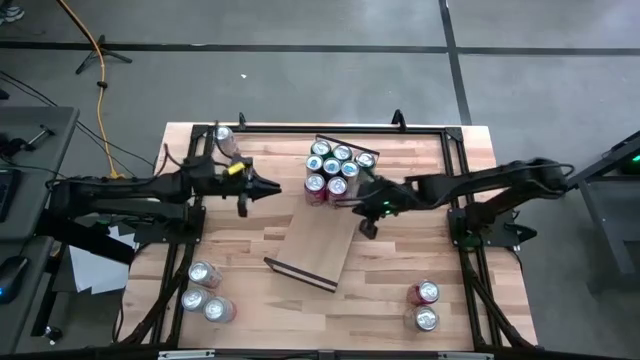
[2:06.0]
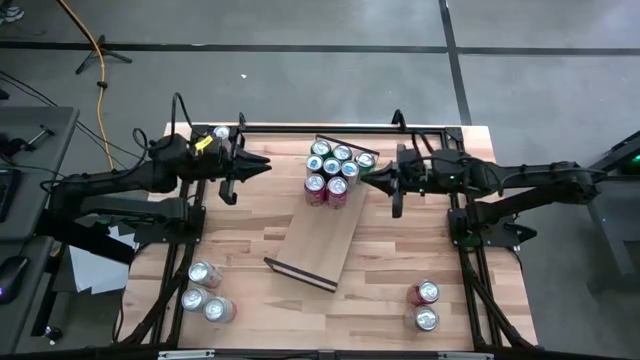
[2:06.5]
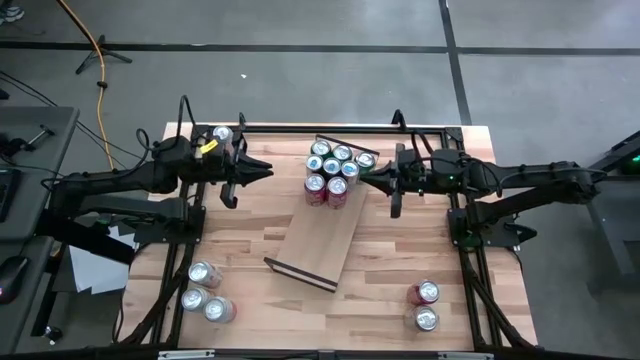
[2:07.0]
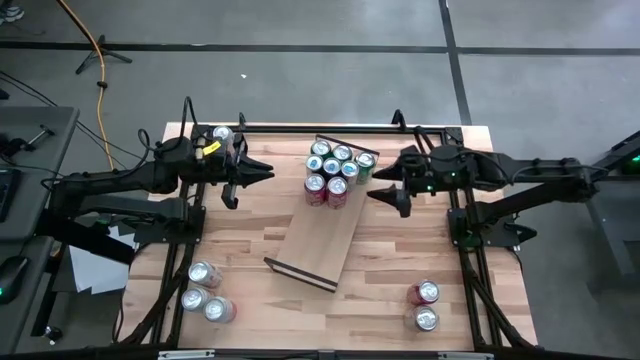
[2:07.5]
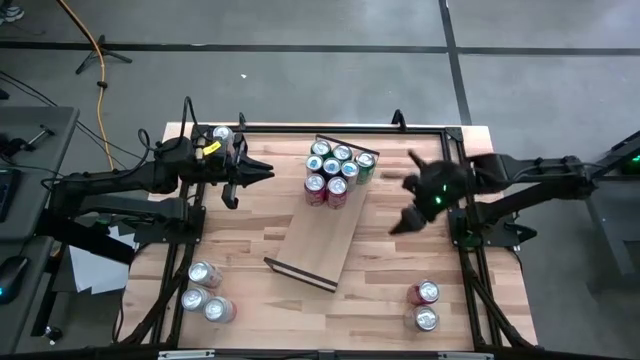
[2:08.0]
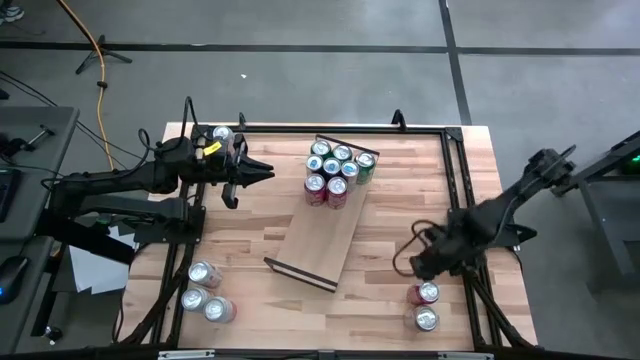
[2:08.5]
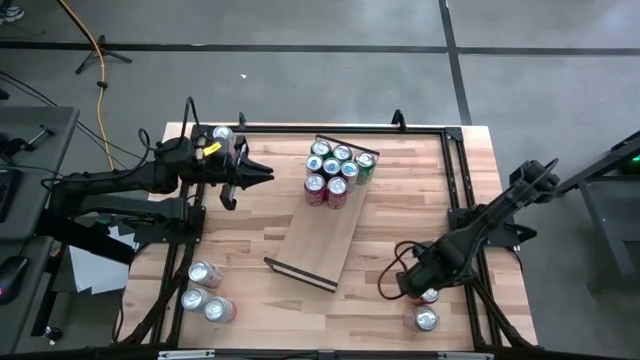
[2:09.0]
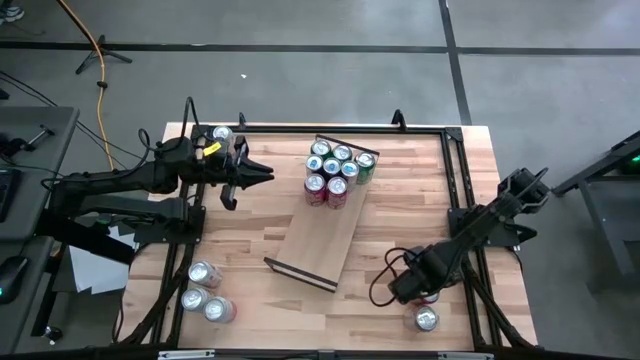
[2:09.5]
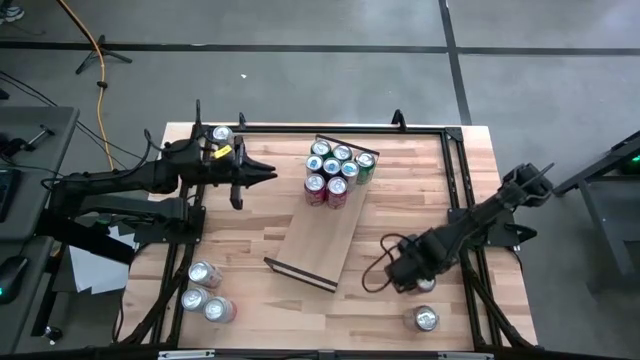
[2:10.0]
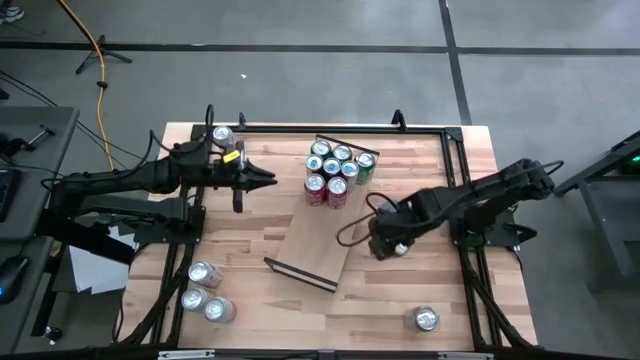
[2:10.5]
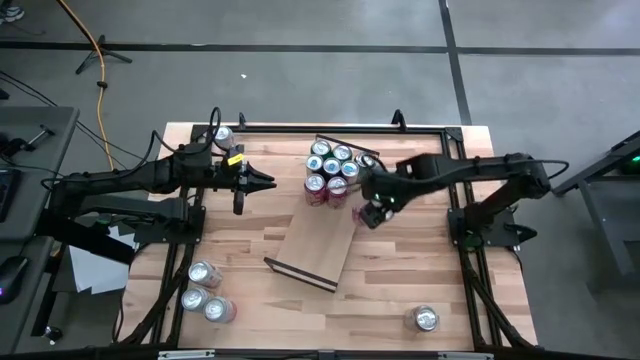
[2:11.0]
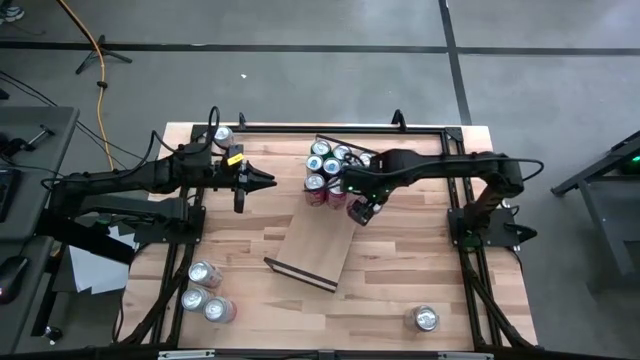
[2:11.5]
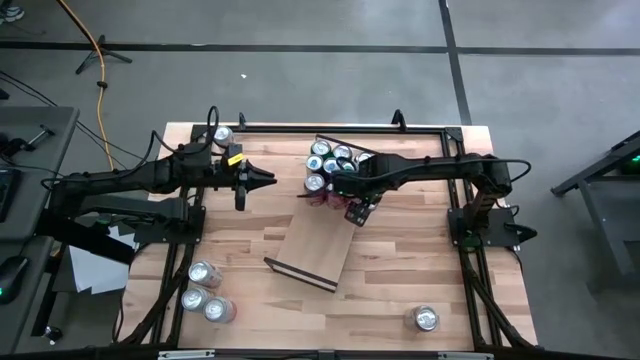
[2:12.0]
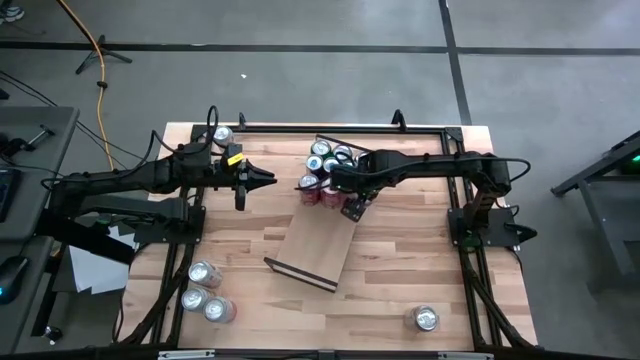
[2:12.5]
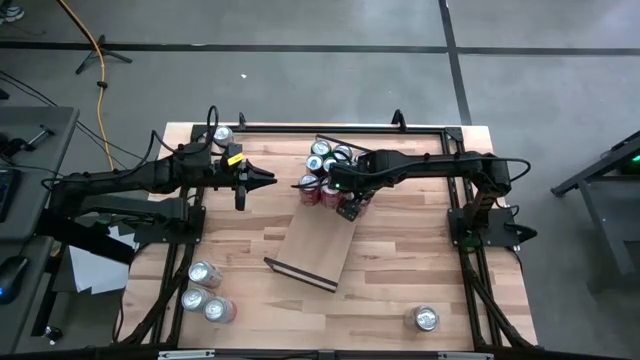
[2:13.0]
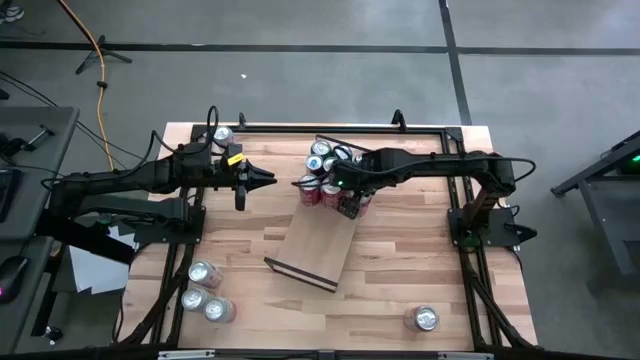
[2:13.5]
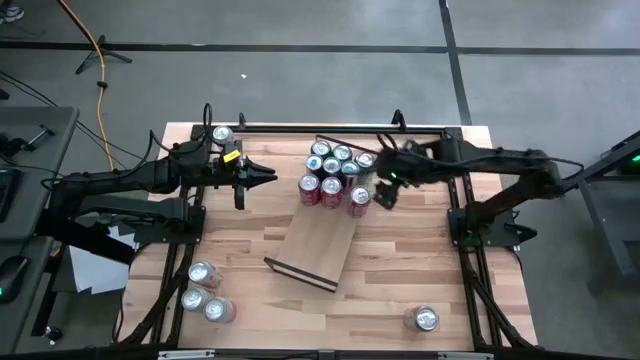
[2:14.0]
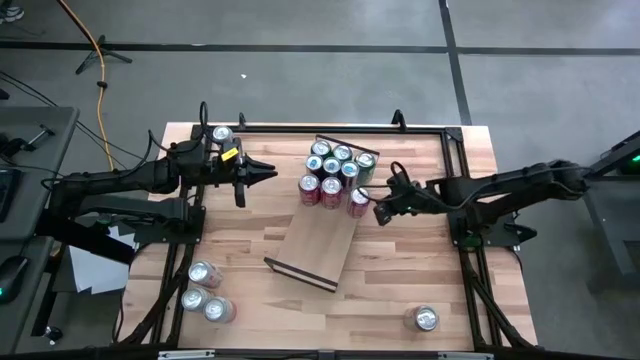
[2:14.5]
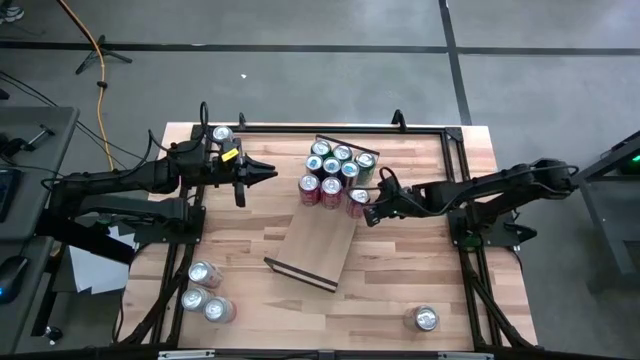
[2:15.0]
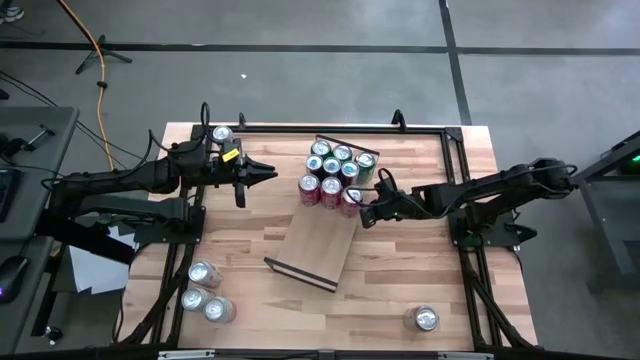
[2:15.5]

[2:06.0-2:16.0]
Task: Place canned beverage on shelf
Put the red soda can on the shelf aligned with the other red soda can

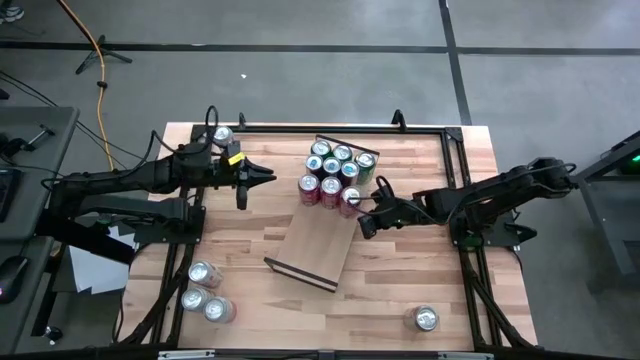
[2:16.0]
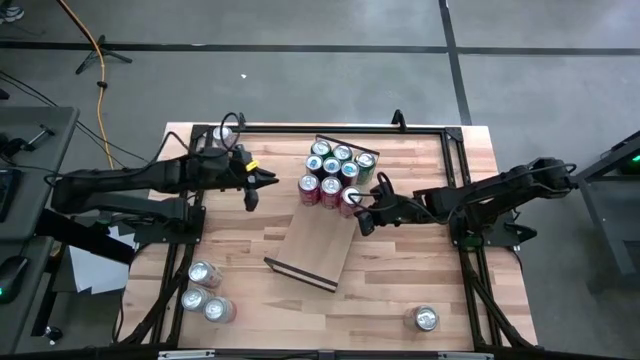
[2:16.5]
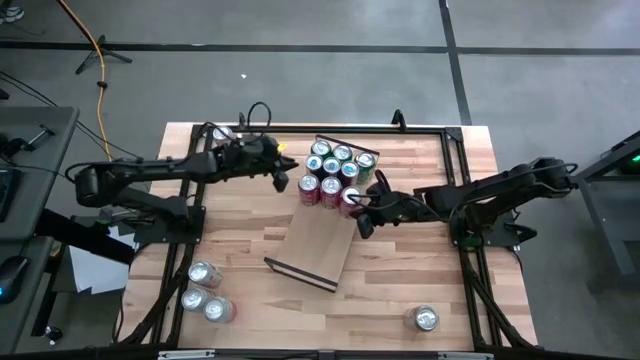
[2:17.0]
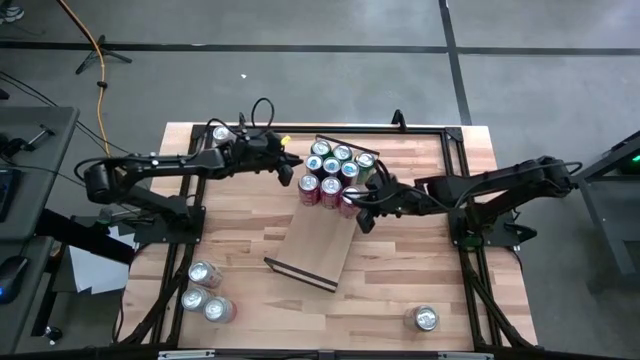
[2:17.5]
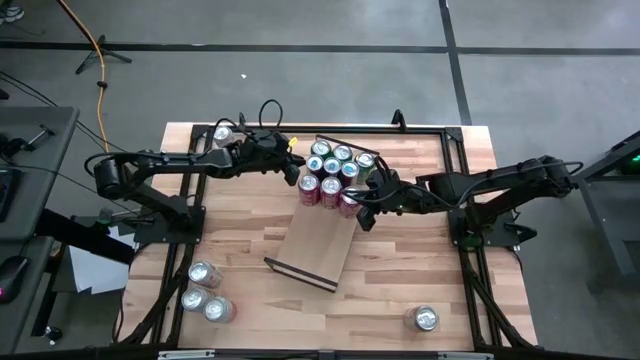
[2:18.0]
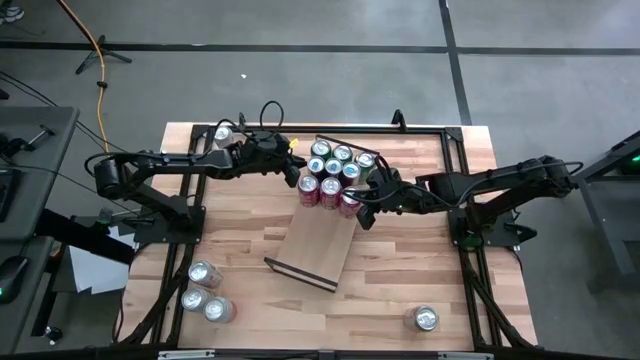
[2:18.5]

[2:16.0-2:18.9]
Adjust the blue soda cans on the shelf
